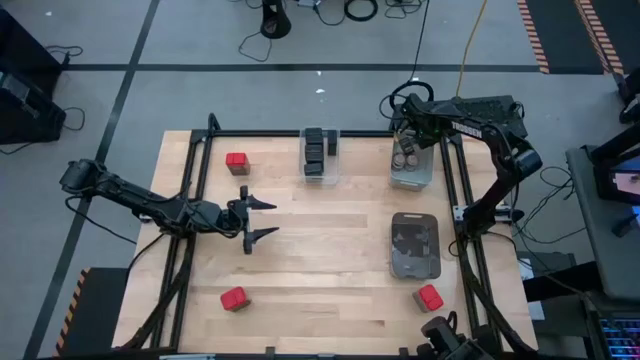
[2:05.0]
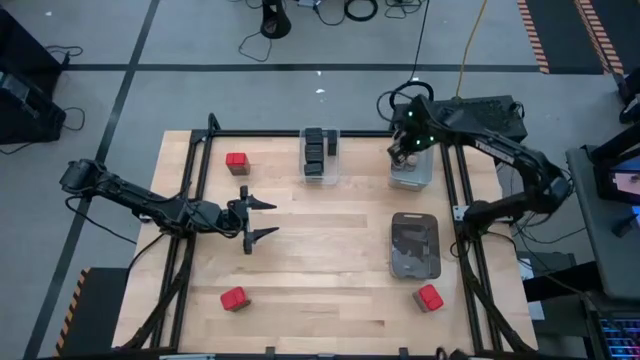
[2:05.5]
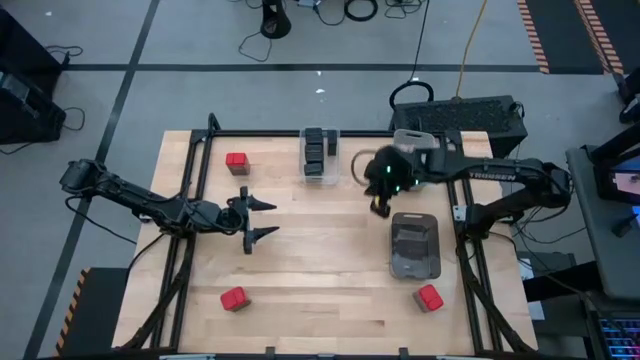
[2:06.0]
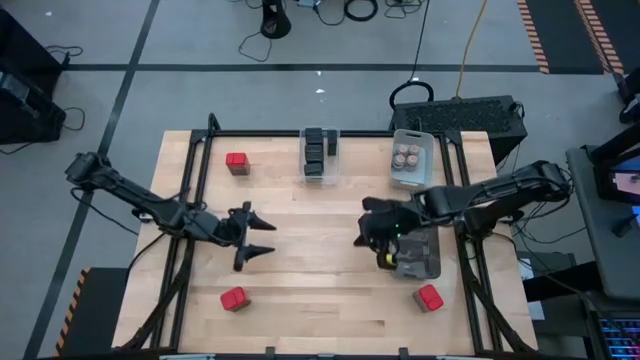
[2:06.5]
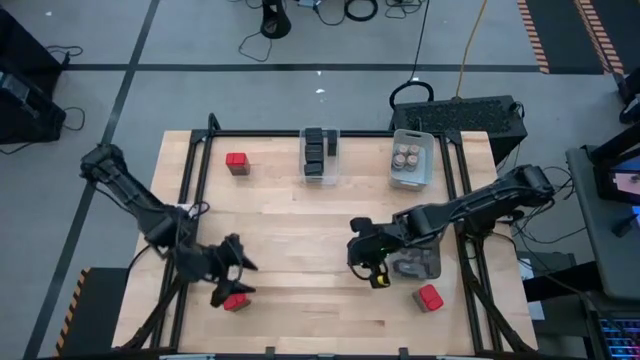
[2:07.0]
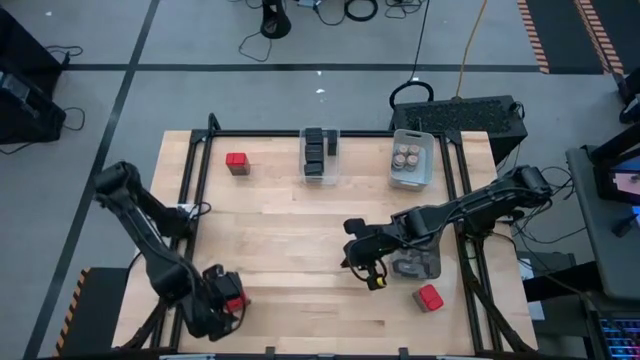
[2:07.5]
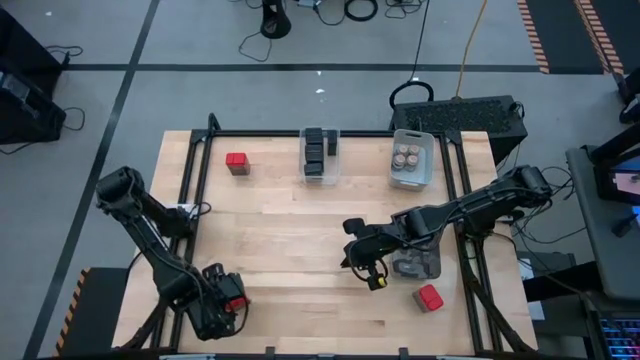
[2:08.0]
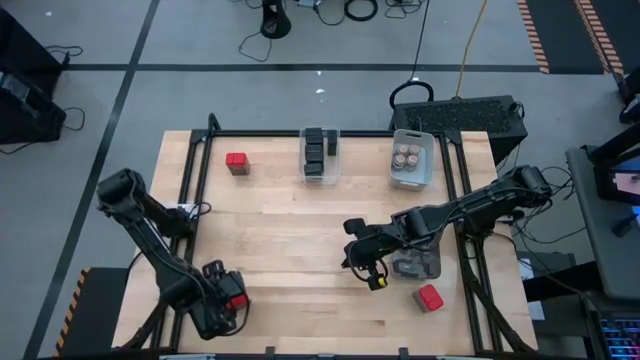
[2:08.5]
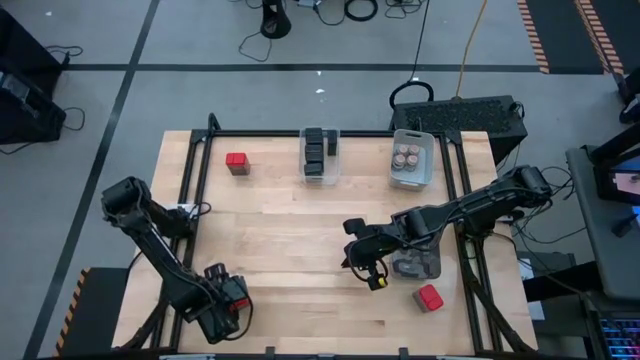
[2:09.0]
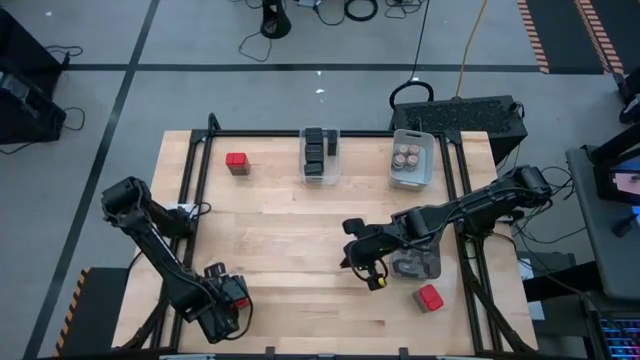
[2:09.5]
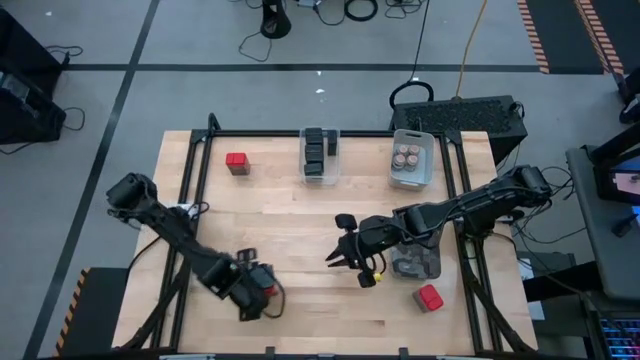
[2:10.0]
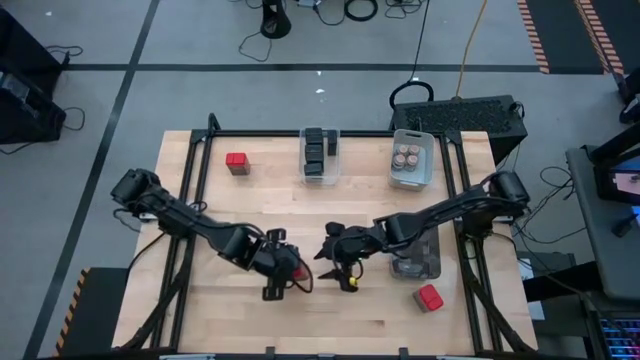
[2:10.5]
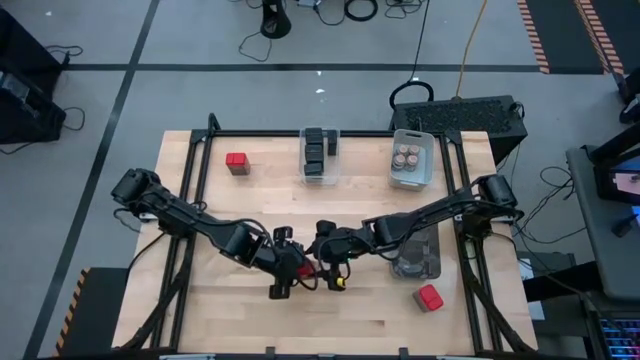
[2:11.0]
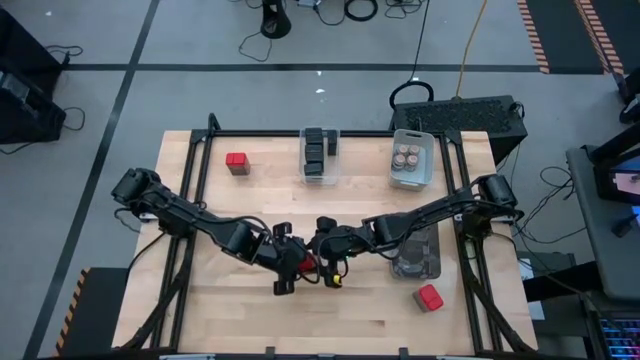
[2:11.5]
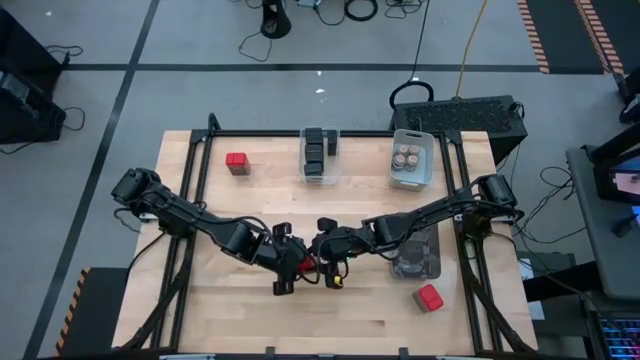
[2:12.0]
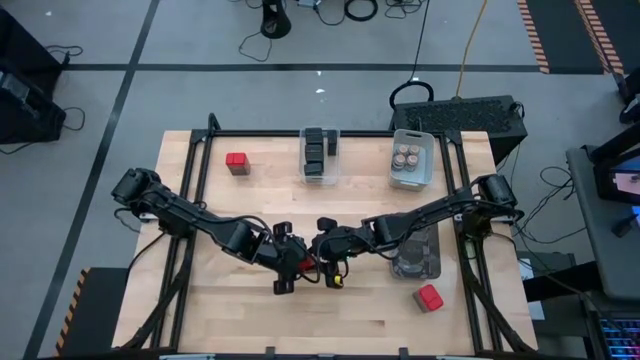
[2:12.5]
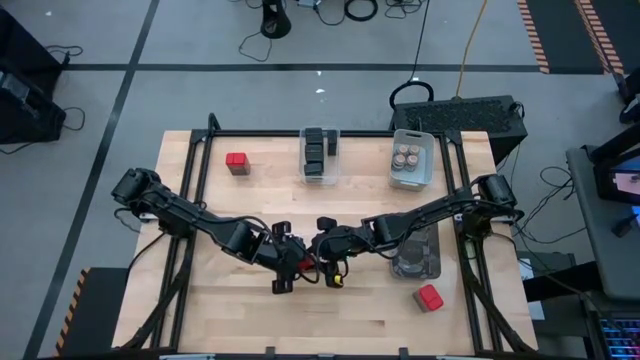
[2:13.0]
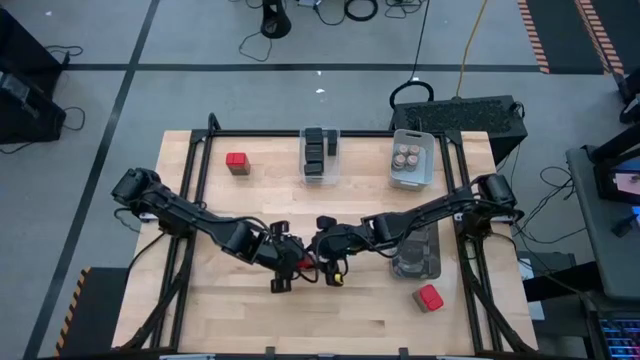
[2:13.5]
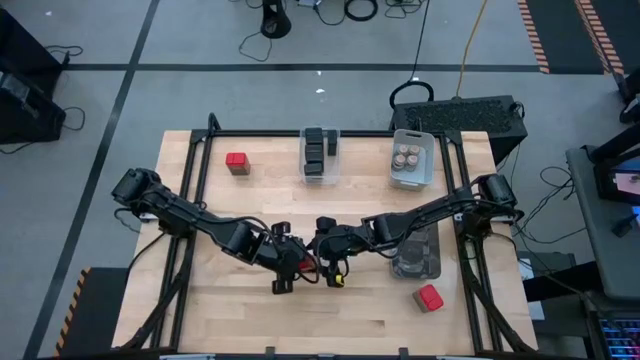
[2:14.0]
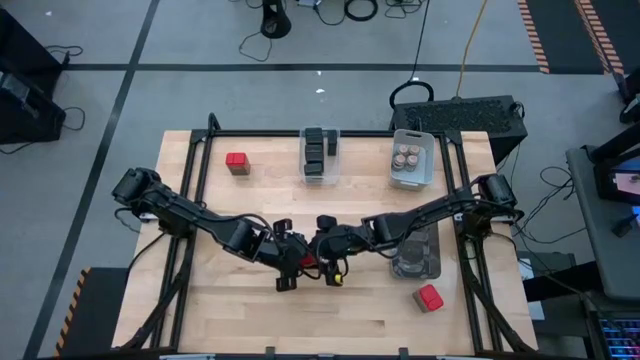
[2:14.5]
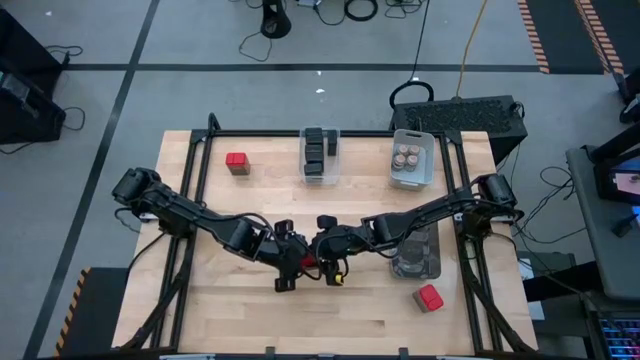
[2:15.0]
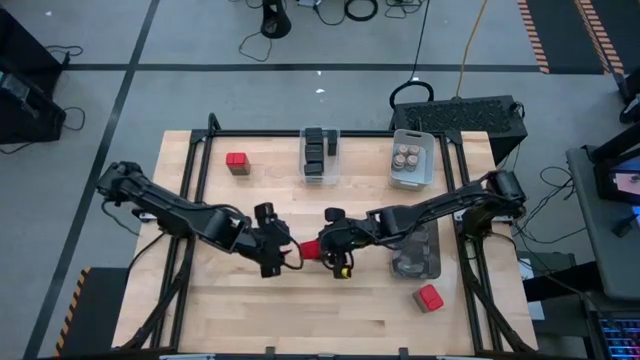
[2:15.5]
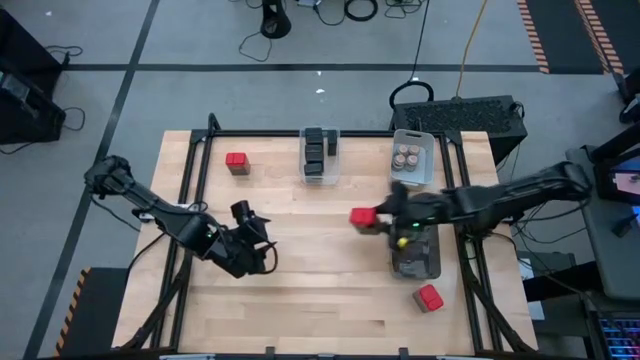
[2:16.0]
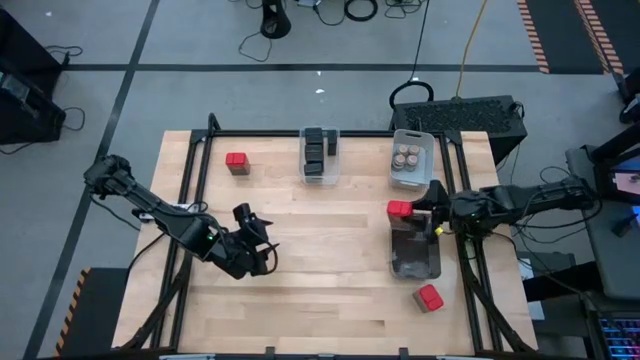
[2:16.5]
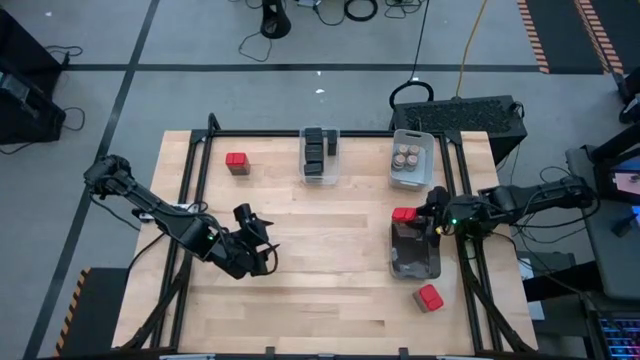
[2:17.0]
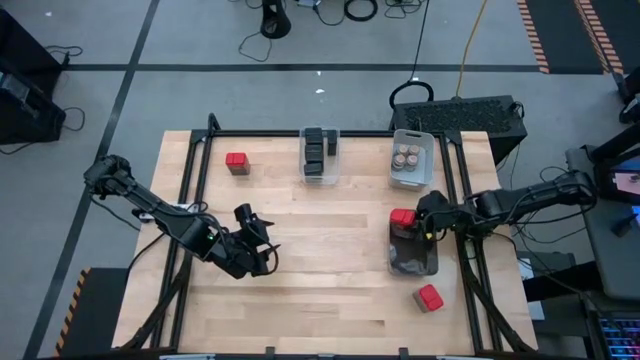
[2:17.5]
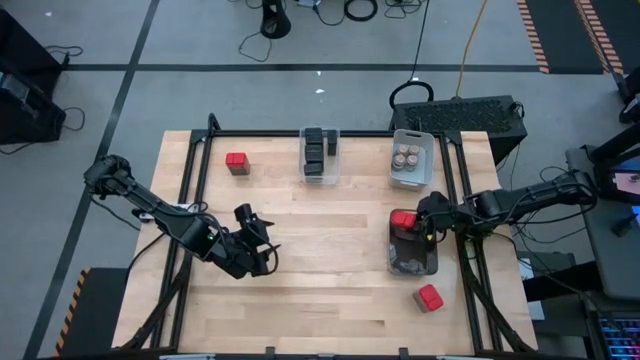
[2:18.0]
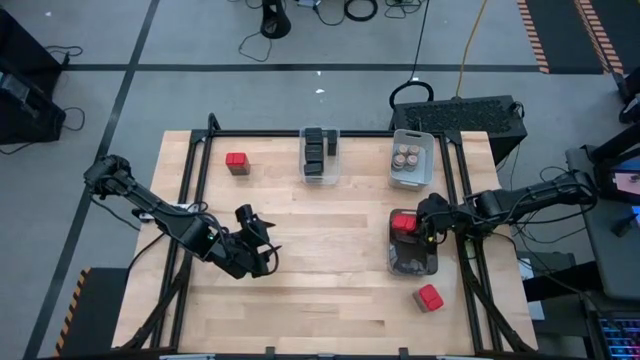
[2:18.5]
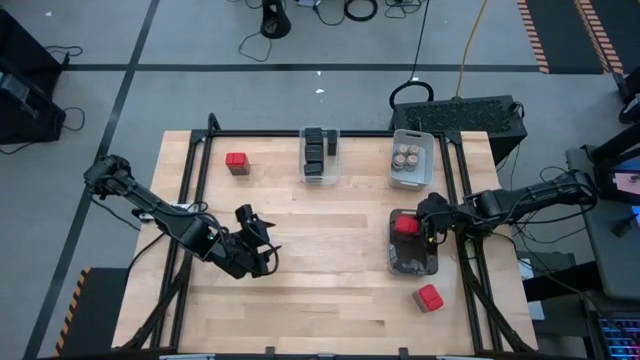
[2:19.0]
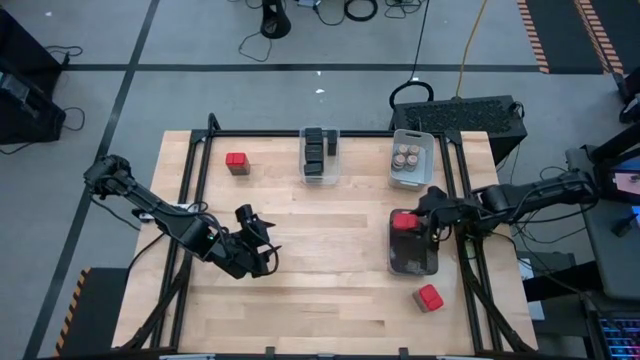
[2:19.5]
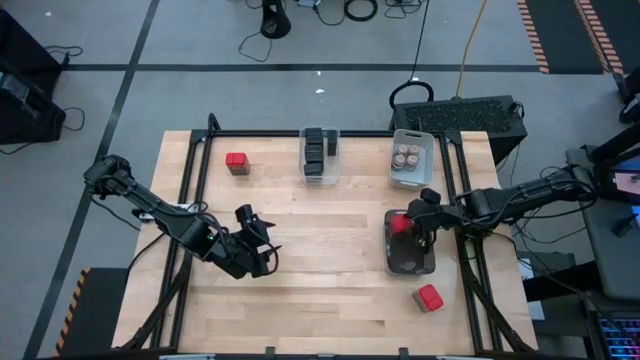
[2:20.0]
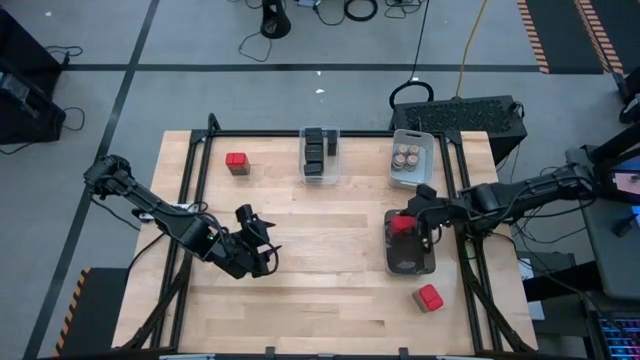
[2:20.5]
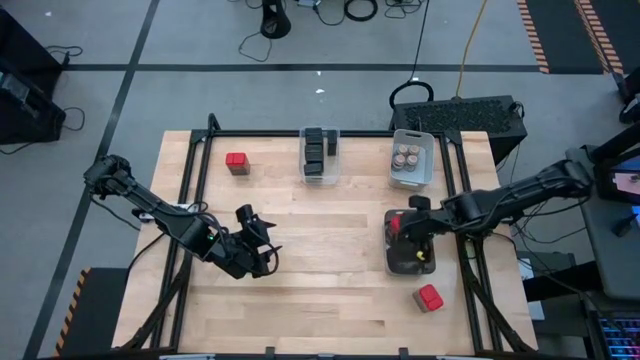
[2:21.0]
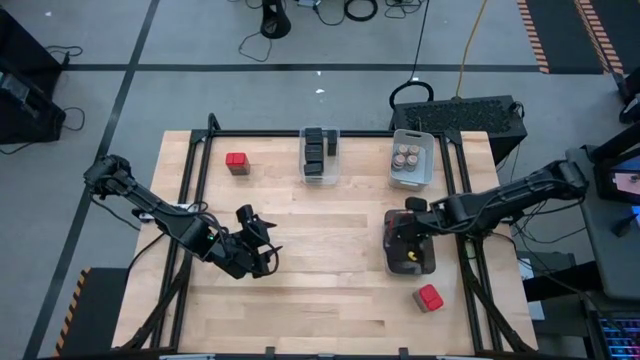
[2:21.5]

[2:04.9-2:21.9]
Task: Sort spices by type
Put the bottom left red seasoning can into the black transparent bin
